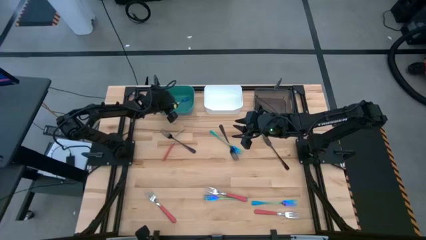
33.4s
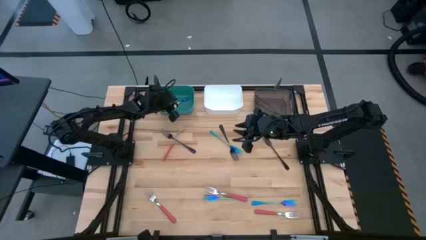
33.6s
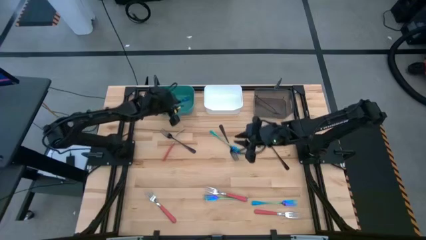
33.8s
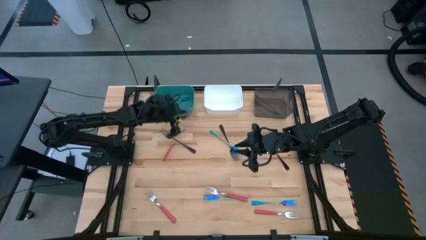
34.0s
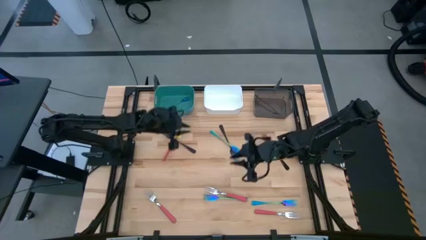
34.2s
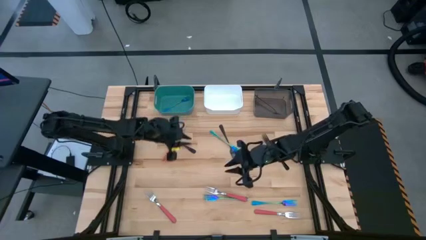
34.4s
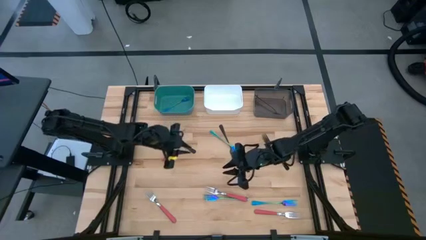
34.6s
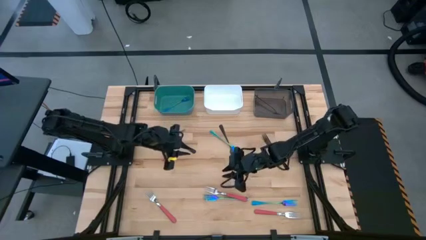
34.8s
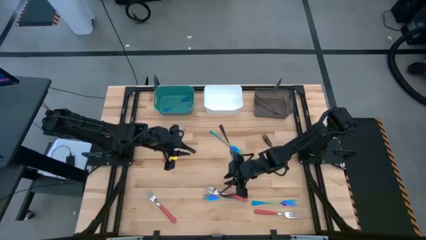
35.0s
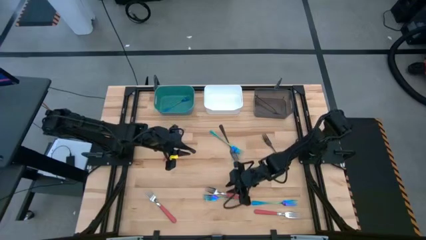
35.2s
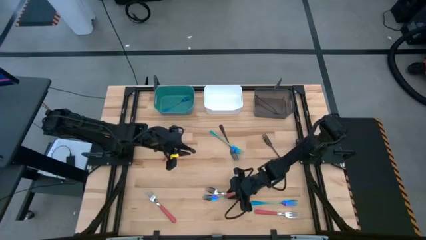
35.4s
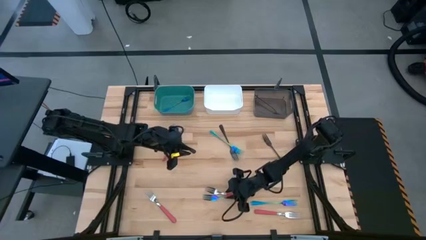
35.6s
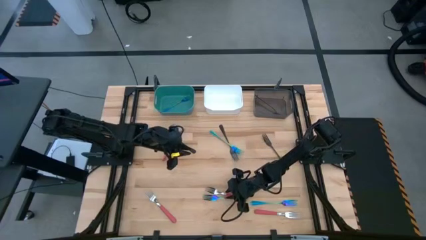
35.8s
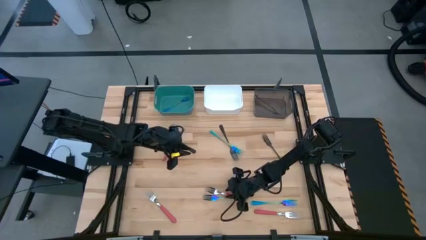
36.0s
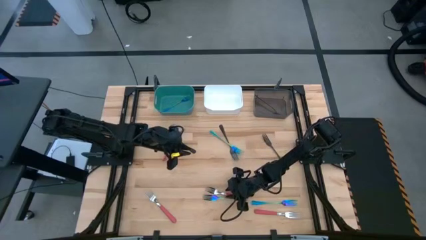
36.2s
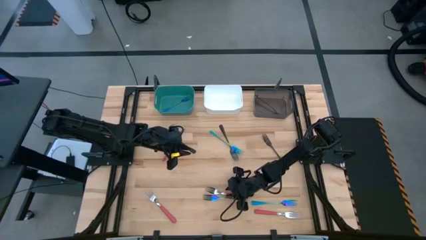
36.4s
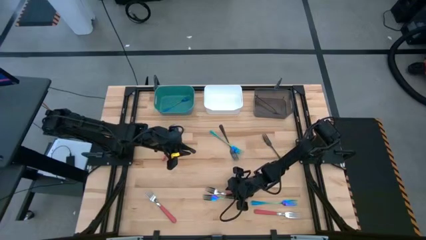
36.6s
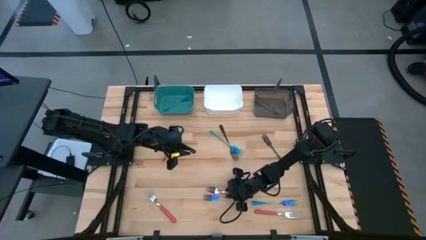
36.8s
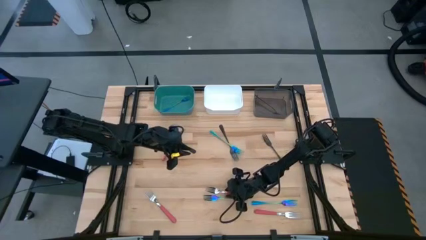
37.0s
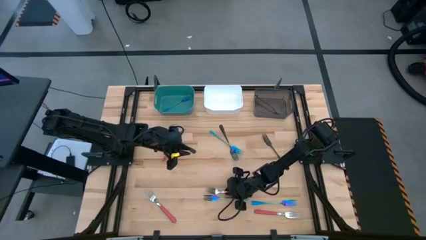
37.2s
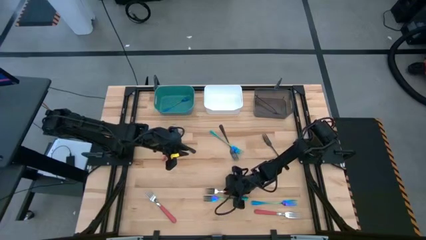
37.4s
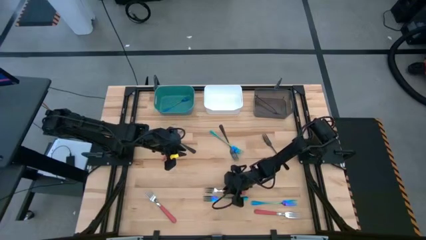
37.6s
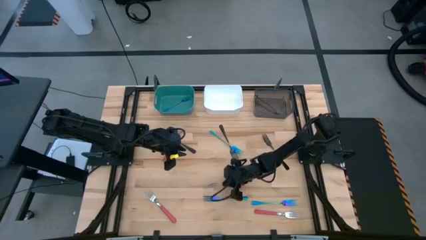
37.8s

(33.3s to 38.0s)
Task: Sort silverware by color (type)
Put the red fork into the white bin

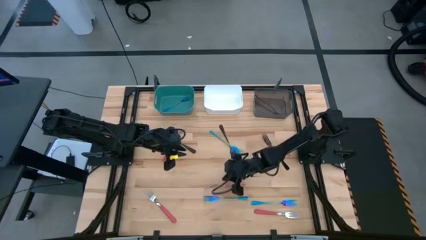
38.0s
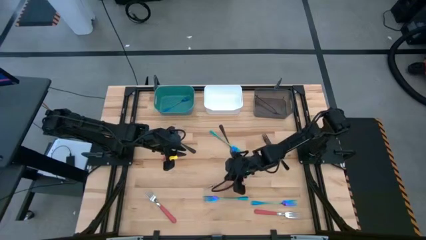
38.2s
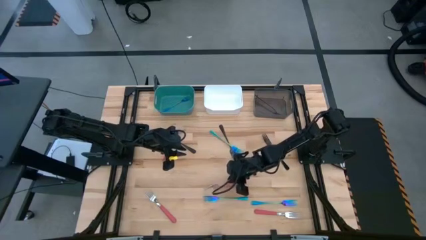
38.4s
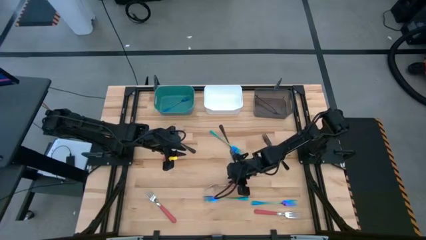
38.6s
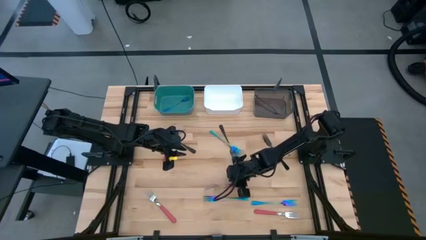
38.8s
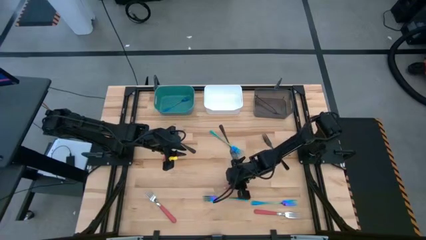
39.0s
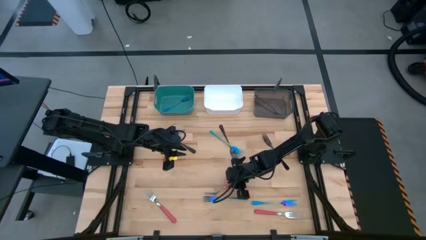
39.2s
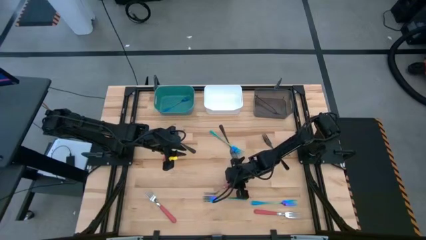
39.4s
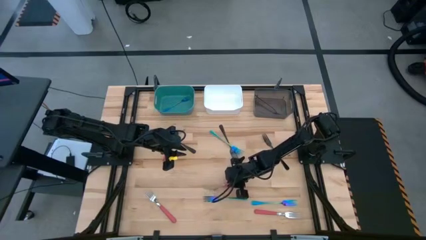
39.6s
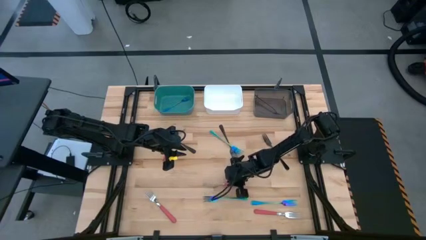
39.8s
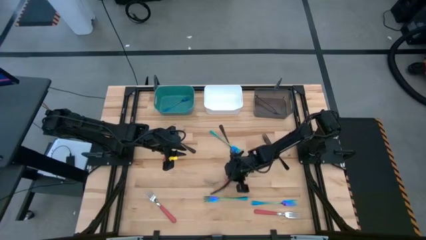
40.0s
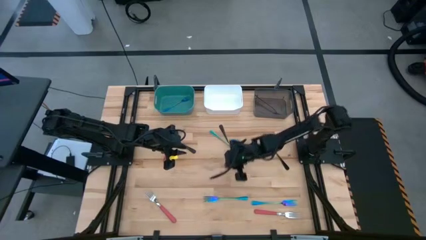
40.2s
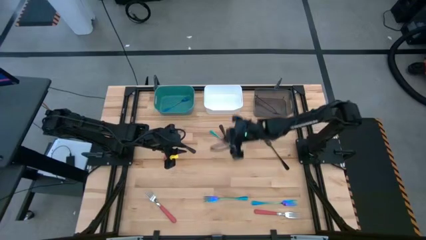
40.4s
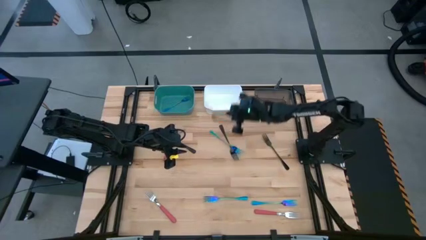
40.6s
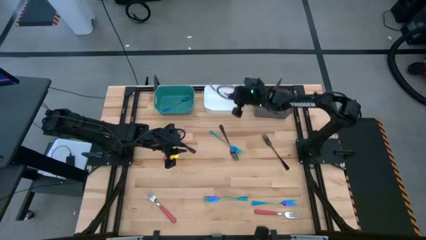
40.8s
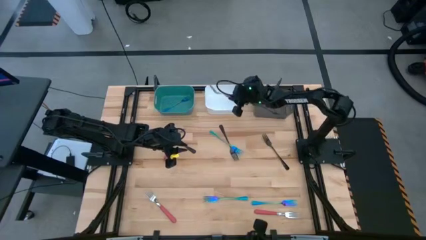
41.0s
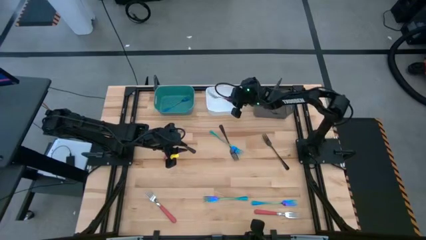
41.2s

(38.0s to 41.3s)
Put the red fork into the white bin
